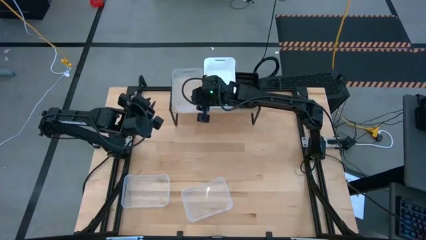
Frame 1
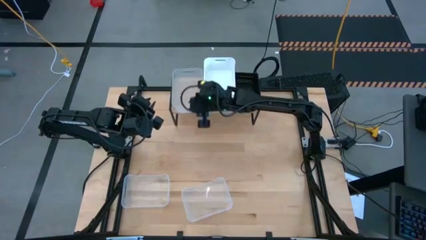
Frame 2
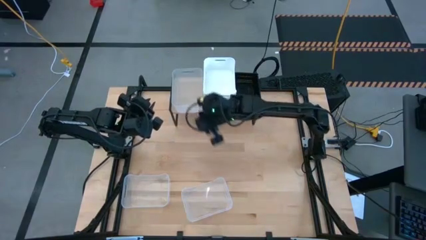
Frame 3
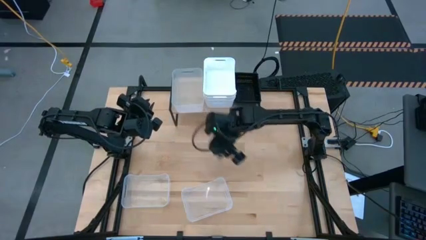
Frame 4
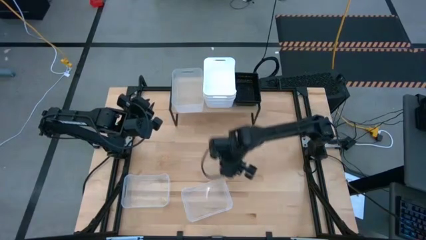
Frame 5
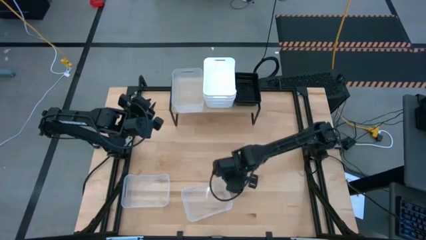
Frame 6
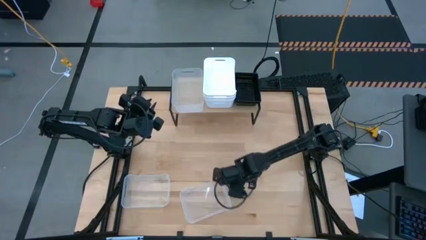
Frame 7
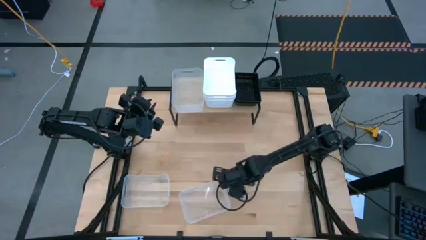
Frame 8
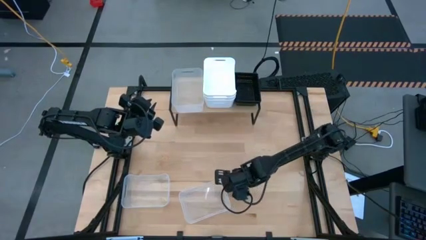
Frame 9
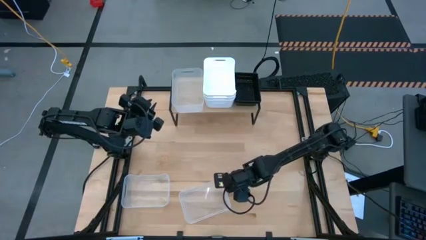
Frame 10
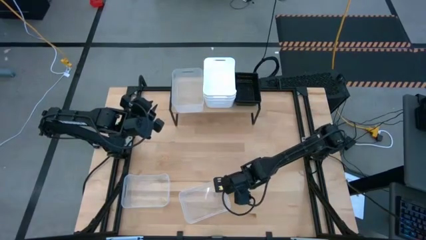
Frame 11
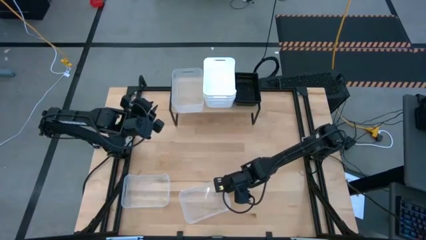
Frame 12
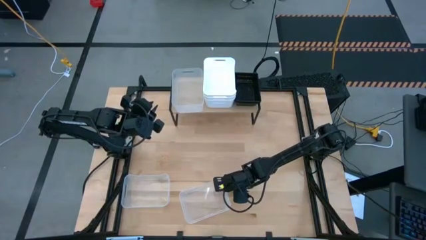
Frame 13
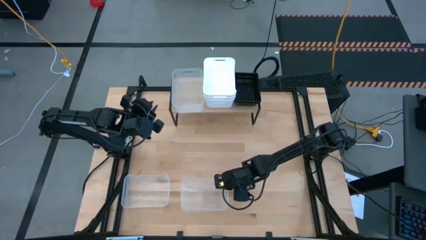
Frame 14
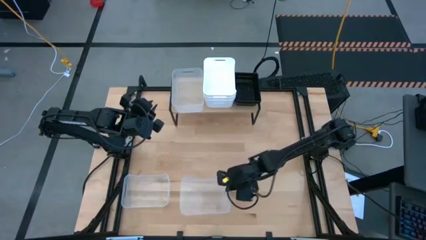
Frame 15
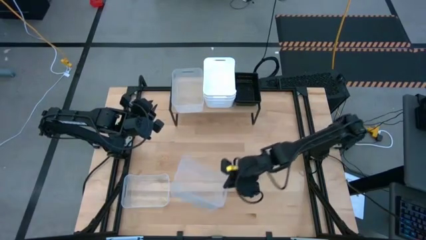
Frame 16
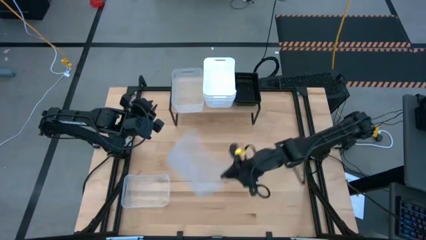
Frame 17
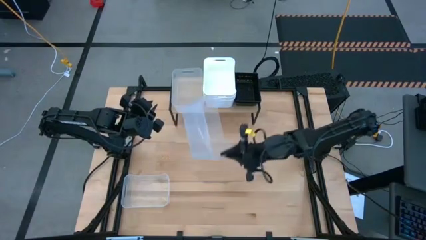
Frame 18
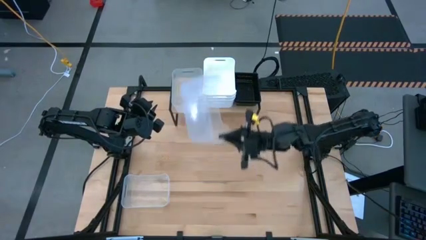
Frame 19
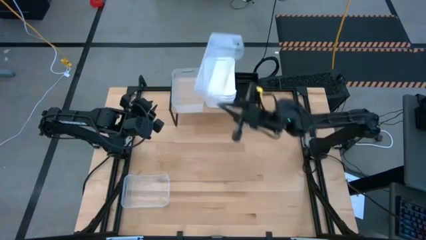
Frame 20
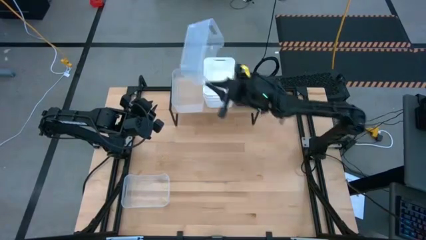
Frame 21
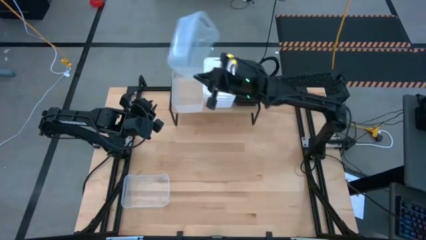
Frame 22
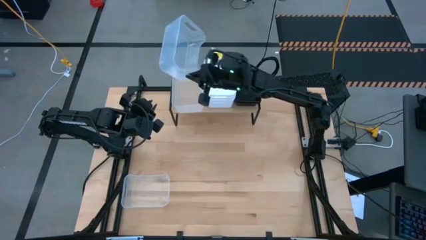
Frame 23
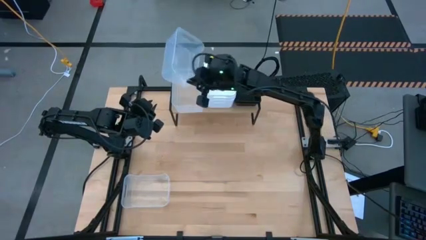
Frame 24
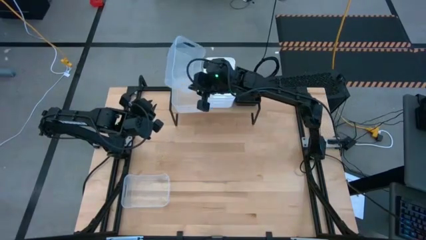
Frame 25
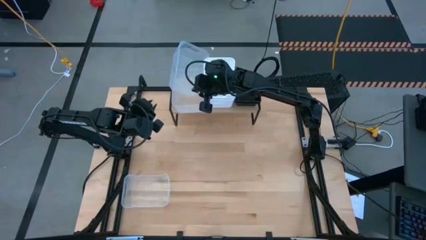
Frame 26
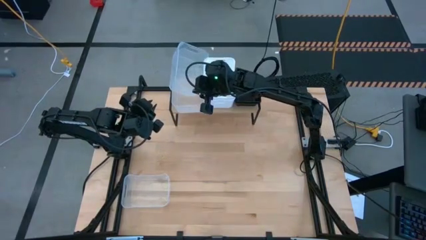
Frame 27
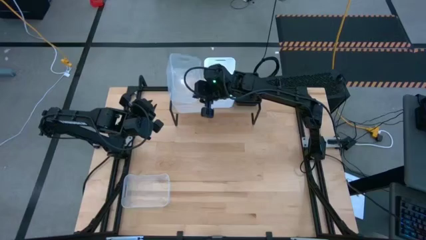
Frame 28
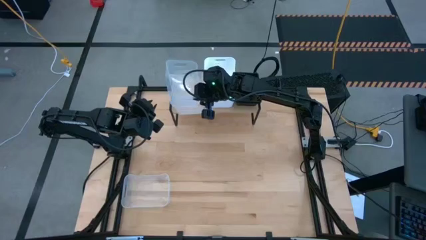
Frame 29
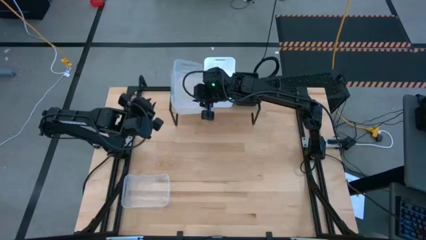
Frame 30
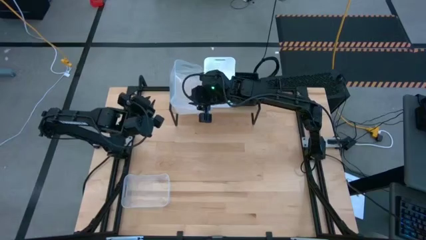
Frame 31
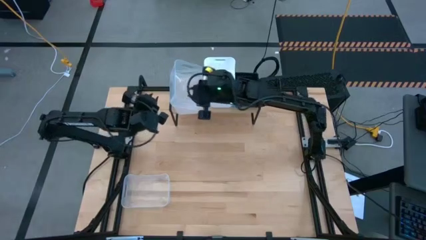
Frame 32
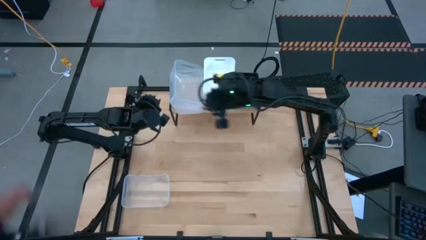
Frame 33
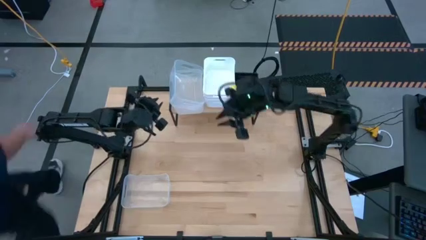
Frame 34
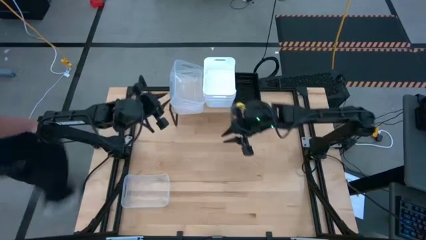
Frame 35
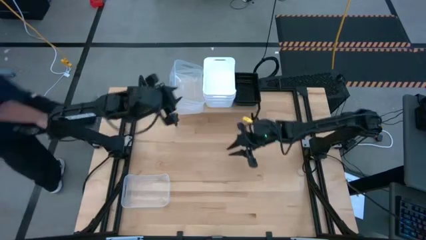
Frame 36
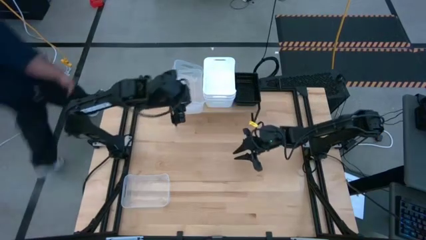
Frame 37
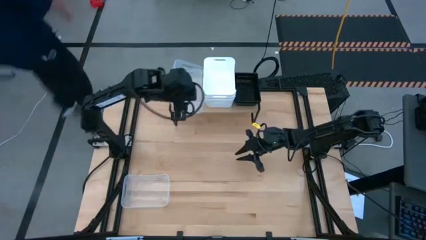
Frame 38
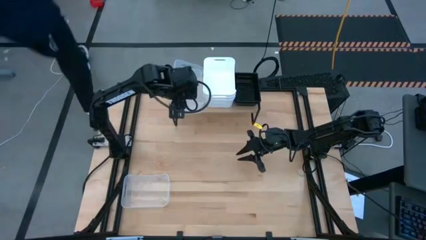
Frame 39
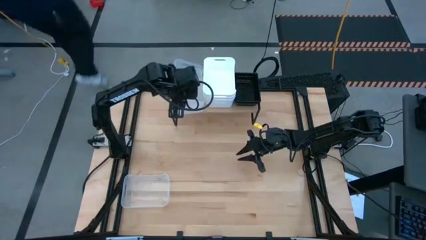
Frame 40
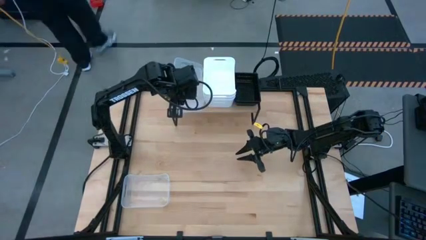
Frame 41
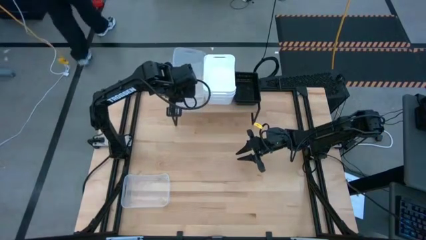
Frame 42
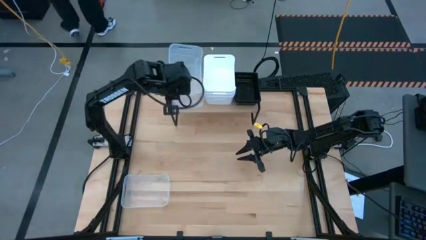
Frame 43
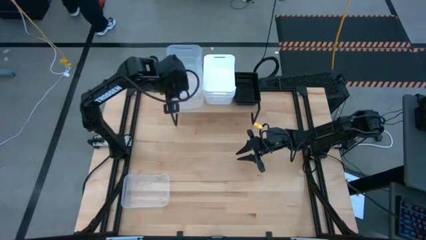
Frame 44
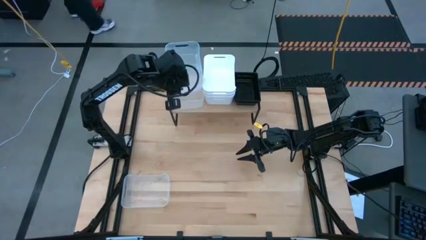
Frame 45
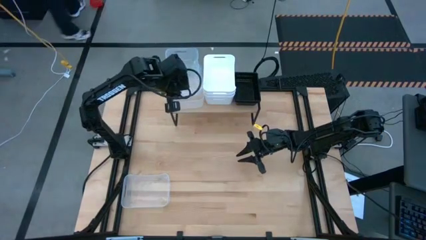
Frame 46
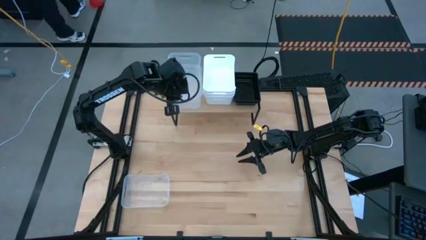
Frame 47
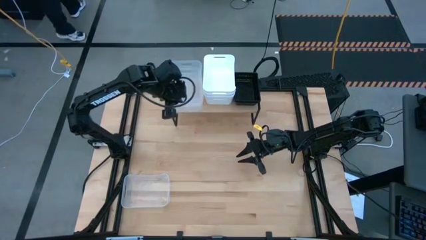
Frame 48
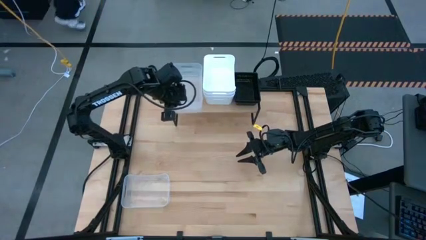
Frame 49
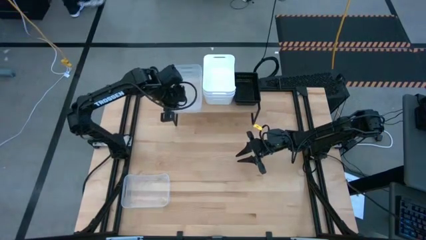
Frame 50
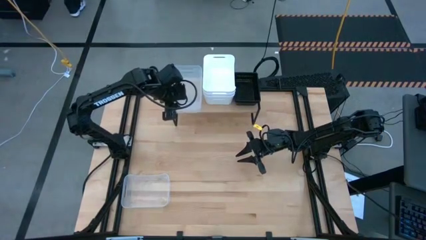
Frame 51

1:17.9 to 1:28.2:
Task: Stack baskets on shelf by color
Stack the right transparent bin on top of the transparent bin on the shelf

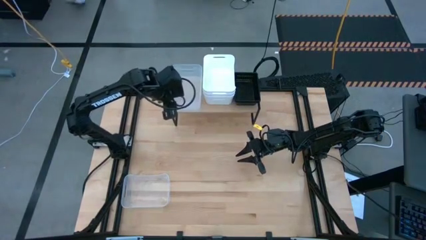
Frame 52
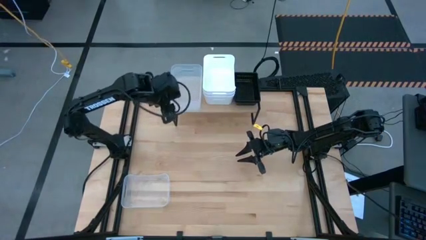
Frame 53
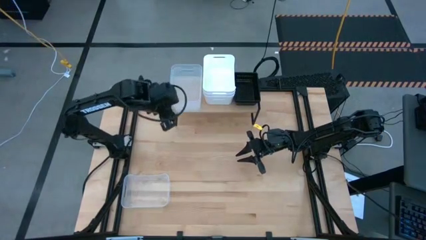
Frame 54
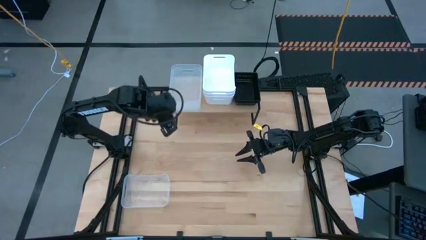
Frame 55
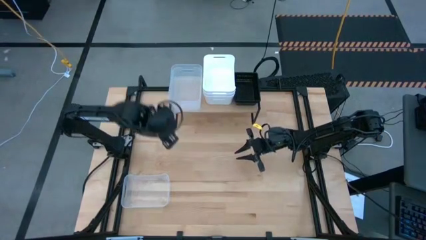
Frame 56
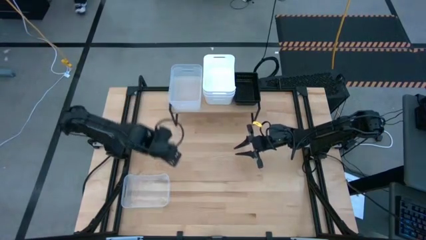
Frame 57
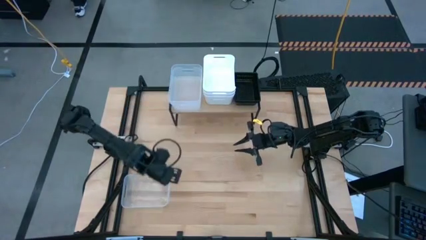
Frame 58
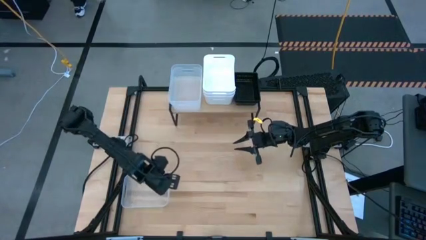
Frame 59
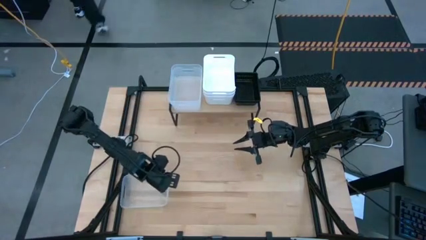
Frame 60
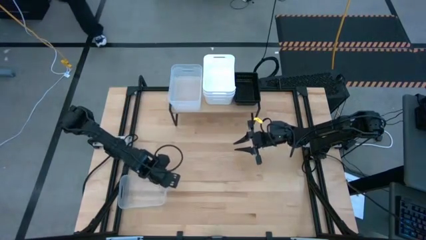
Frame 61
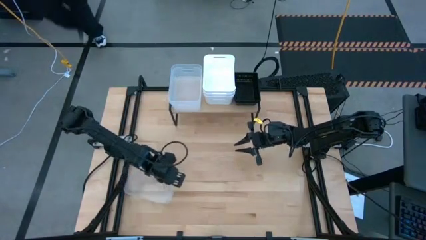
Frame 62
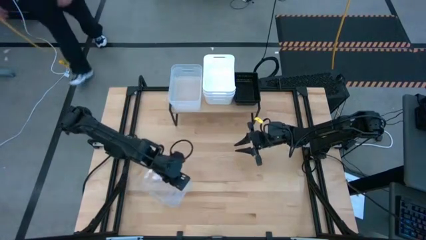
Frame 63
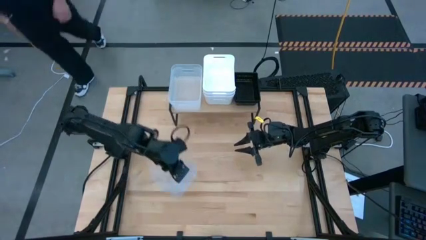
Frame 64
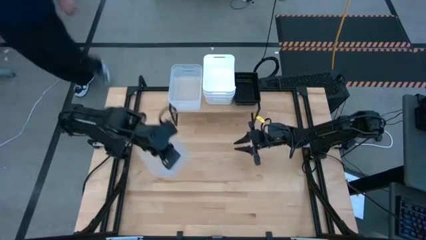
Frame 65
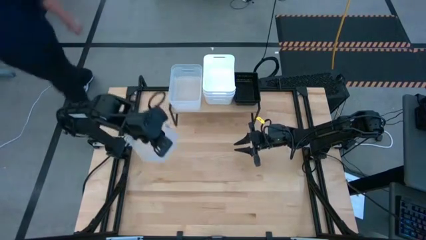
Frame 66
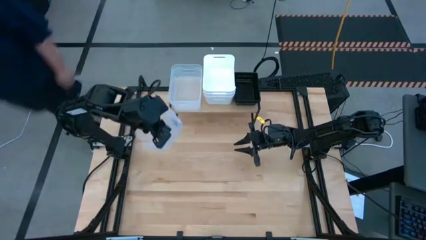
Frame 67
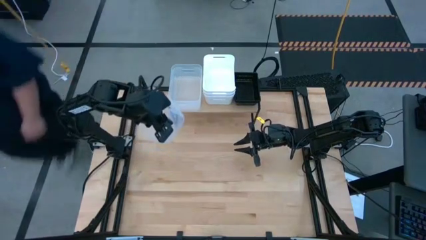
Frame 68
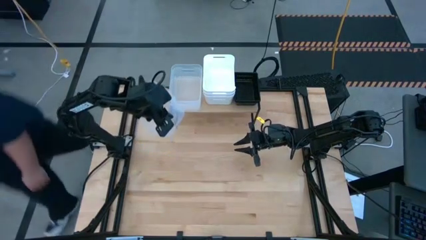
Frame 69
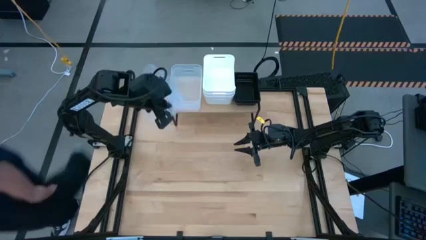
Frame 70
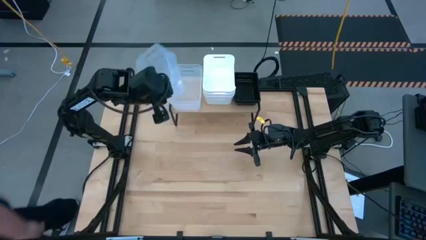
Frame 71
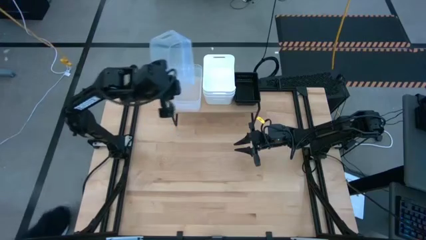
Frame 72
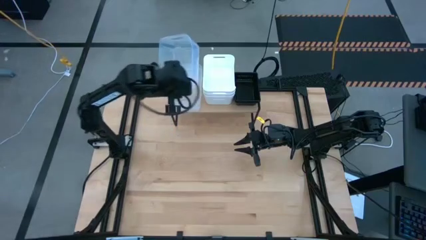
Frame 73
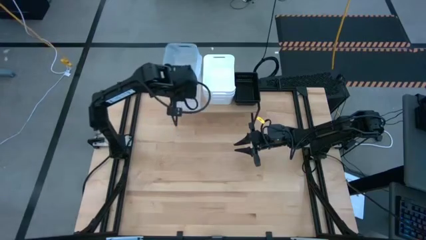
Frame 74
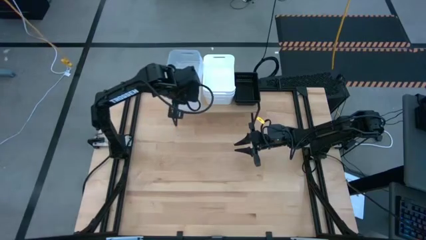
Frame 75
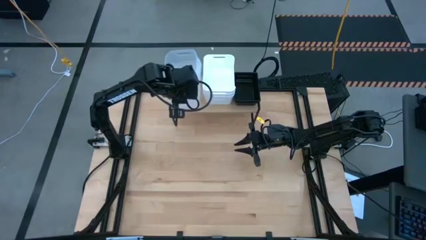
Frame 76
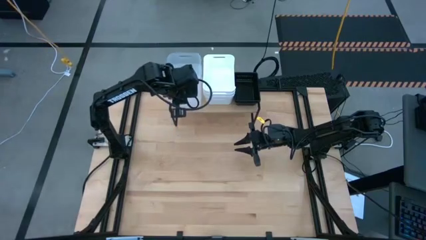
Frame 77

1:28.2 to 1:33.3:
Stack the transparent bin on top of the stacked transparent bins on the shelf

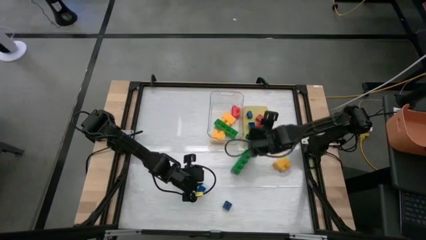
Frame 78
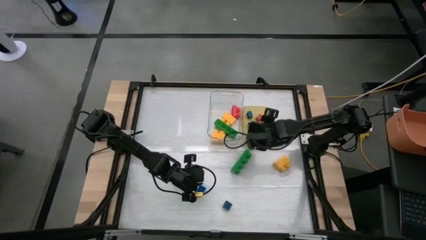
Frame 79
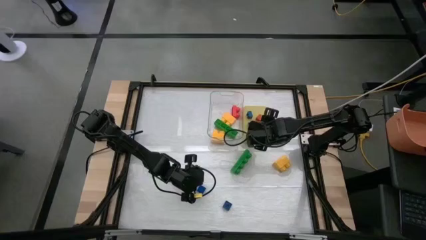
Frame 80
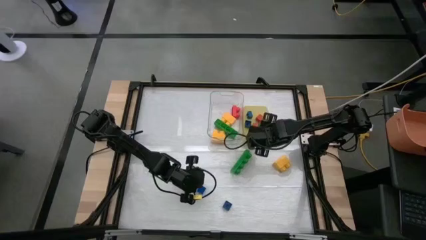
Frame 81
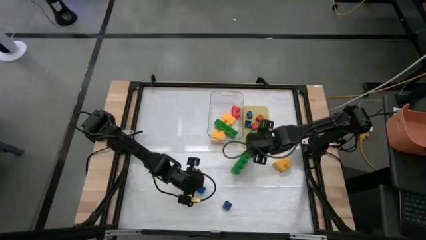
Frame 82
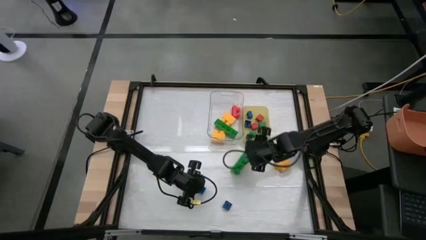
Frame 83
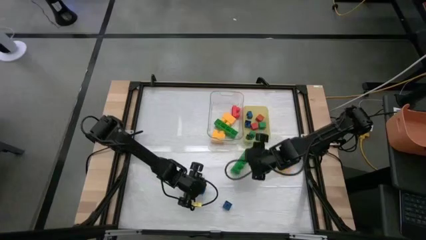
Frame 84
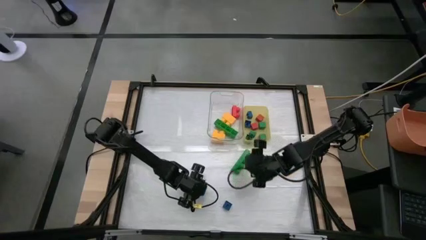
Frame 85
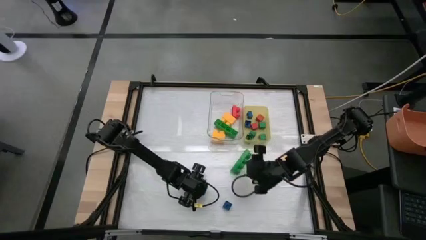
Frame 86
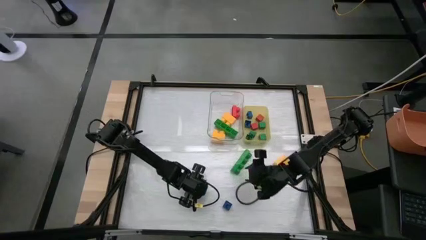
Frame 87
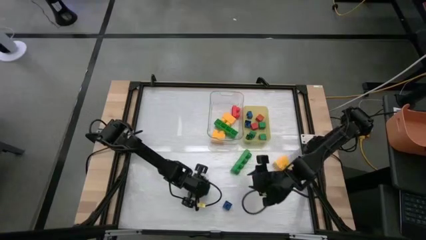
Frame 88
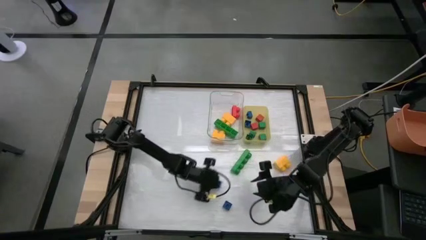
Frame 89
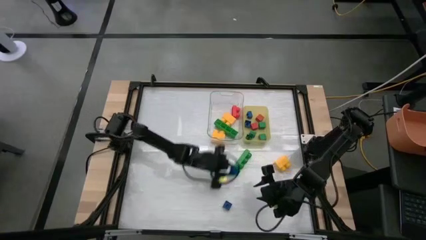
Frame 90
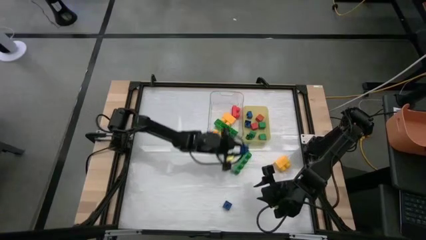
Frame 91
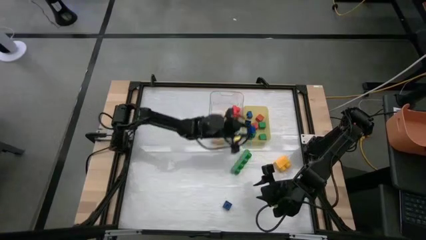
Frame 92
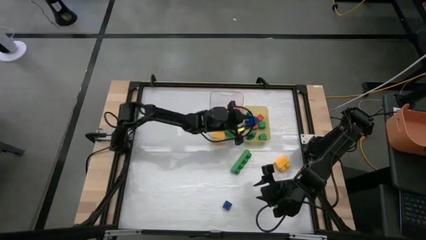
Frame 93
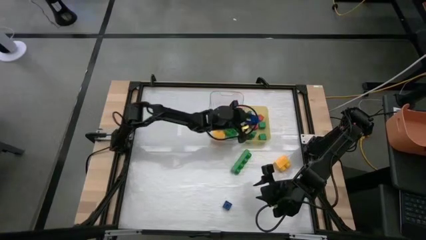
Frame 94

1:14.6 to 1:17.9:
Task: Sort blocks by size
Put the small blue game piece into the yellow bin
